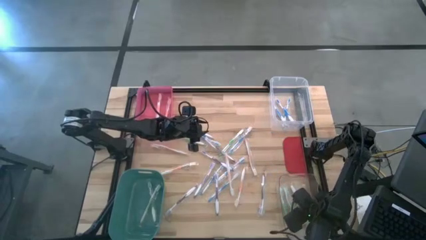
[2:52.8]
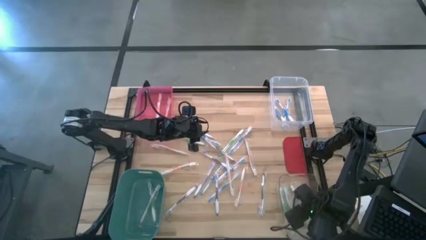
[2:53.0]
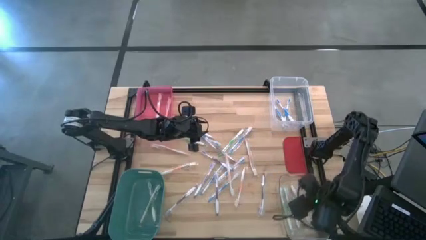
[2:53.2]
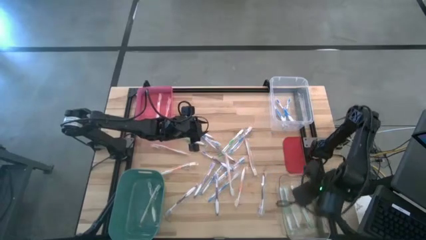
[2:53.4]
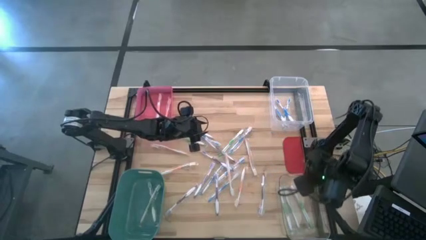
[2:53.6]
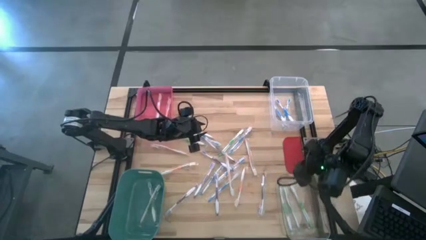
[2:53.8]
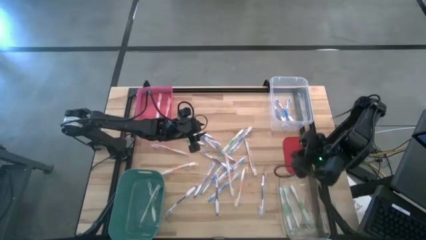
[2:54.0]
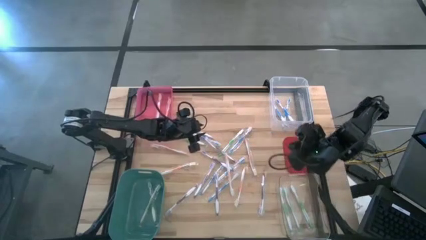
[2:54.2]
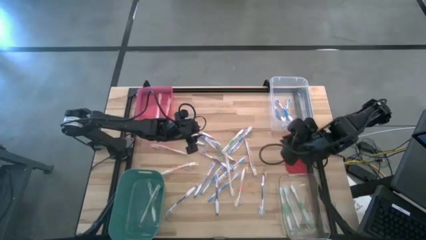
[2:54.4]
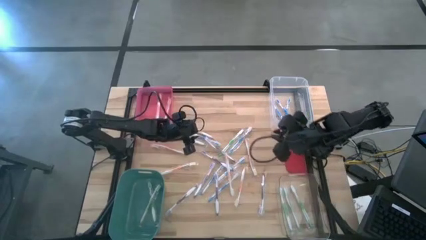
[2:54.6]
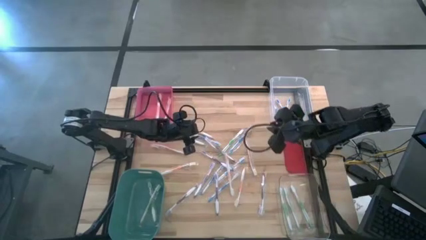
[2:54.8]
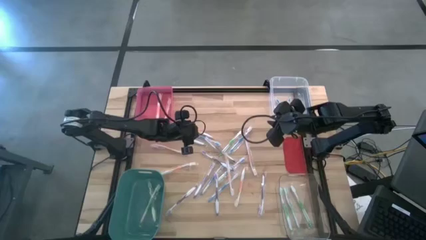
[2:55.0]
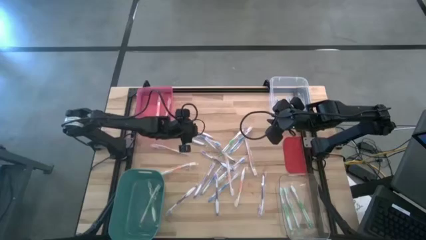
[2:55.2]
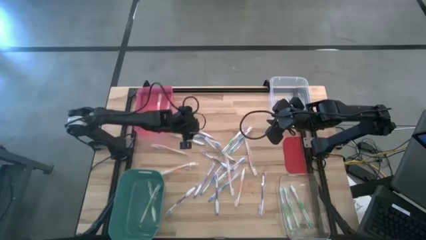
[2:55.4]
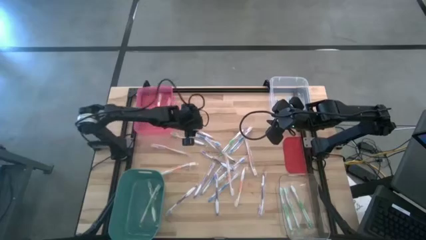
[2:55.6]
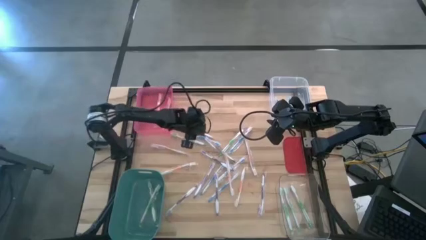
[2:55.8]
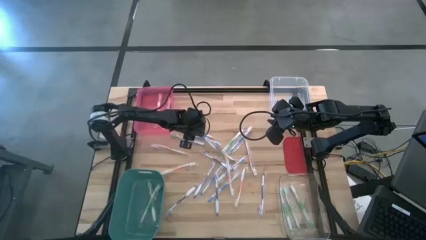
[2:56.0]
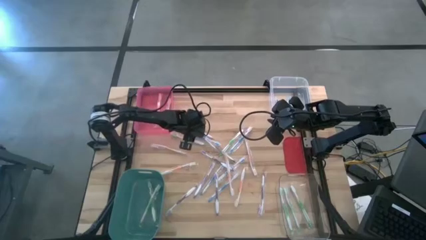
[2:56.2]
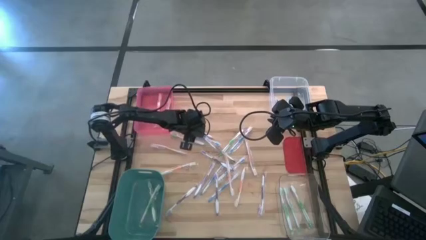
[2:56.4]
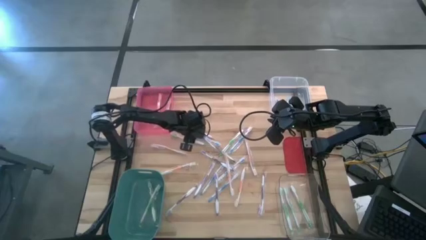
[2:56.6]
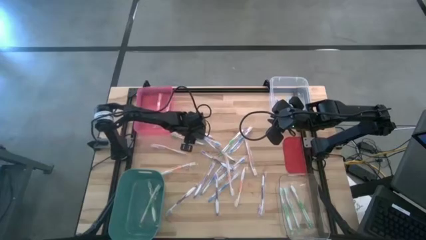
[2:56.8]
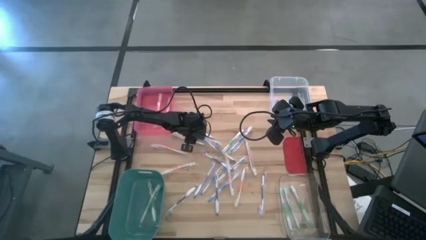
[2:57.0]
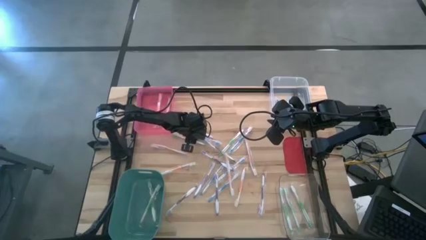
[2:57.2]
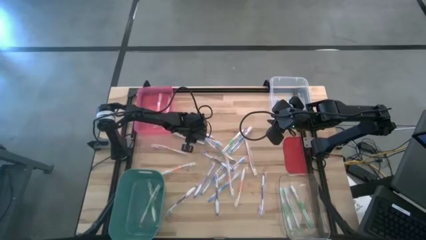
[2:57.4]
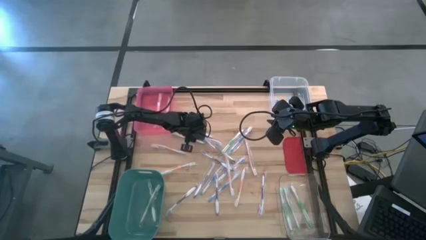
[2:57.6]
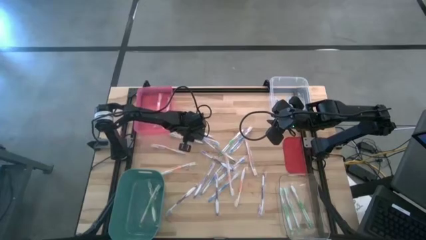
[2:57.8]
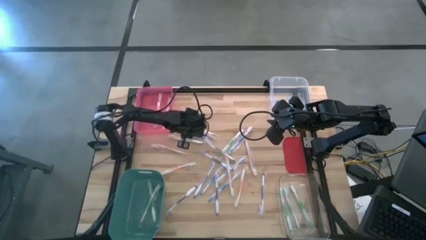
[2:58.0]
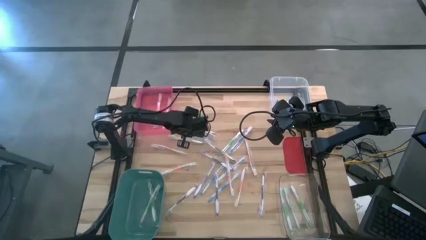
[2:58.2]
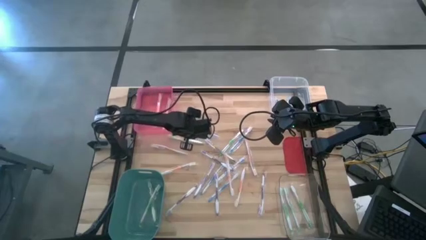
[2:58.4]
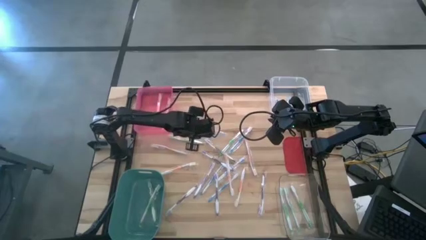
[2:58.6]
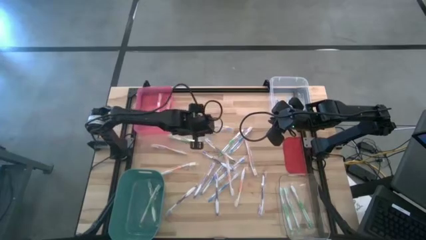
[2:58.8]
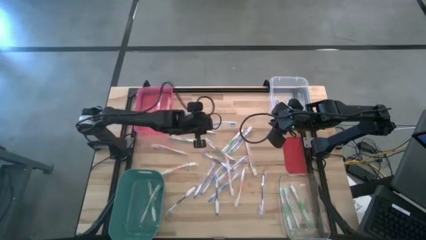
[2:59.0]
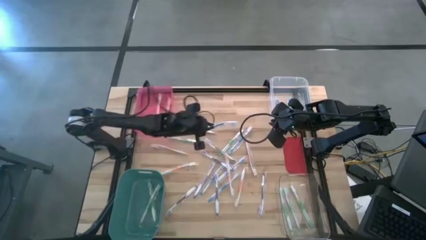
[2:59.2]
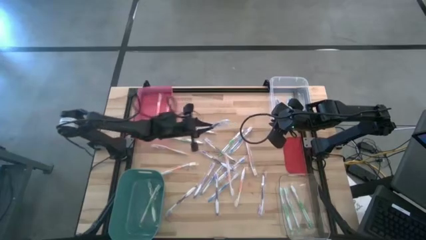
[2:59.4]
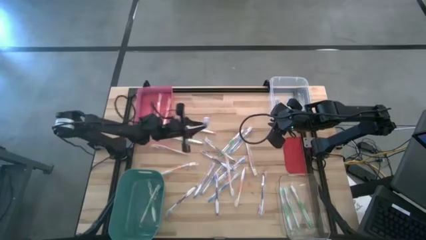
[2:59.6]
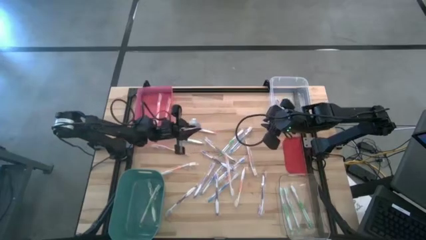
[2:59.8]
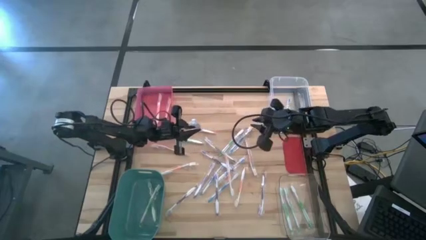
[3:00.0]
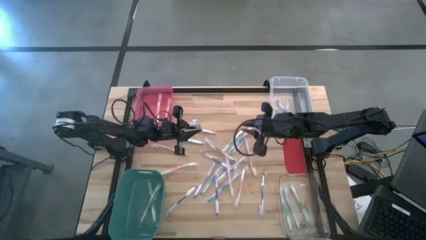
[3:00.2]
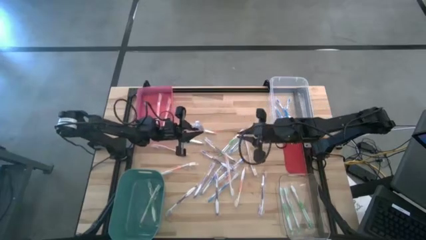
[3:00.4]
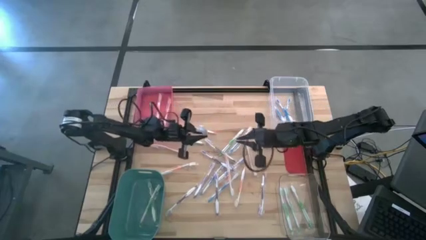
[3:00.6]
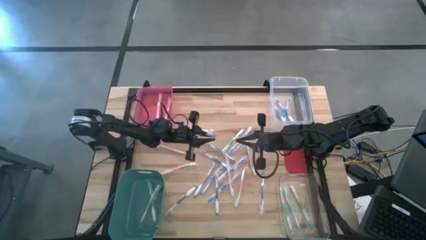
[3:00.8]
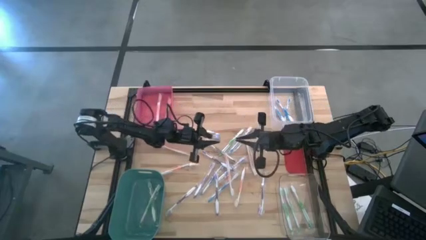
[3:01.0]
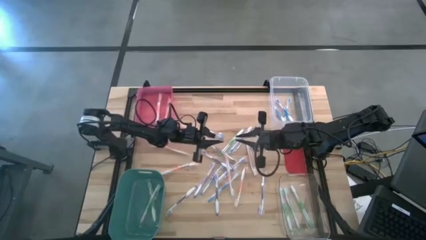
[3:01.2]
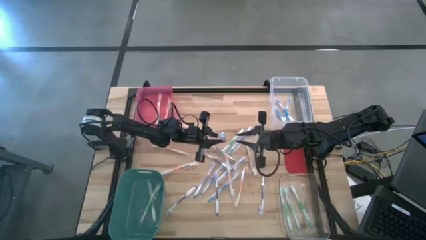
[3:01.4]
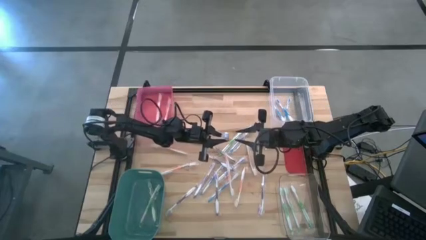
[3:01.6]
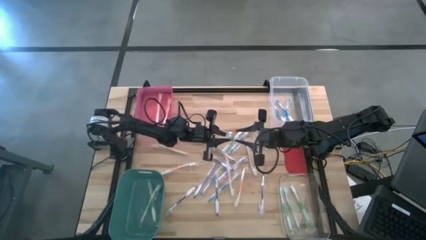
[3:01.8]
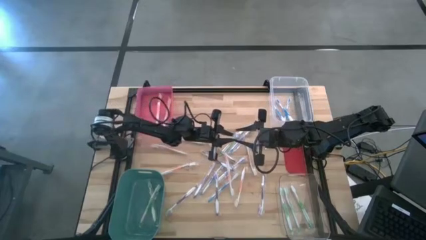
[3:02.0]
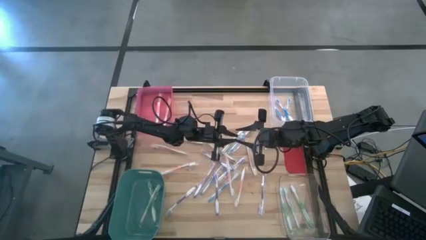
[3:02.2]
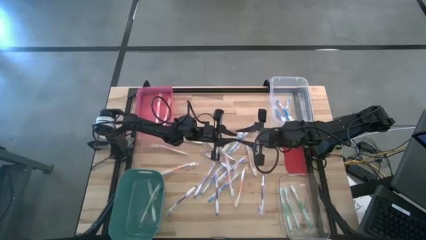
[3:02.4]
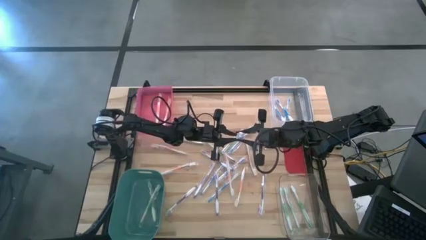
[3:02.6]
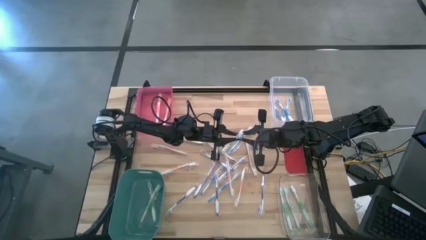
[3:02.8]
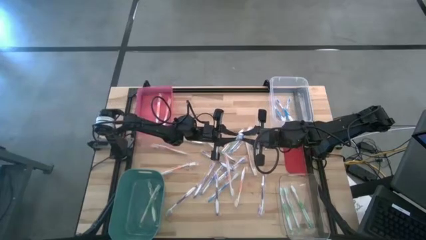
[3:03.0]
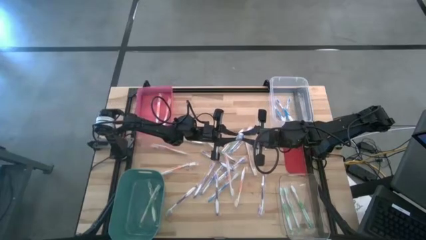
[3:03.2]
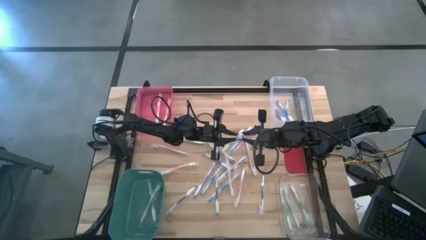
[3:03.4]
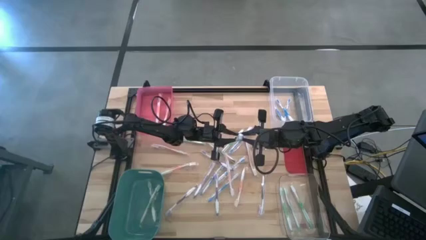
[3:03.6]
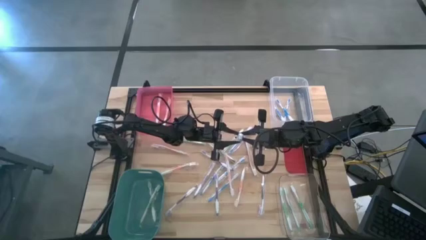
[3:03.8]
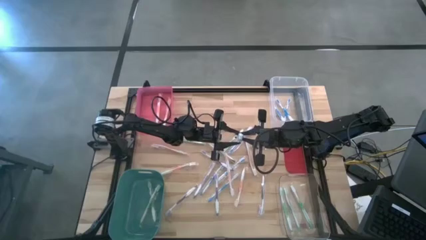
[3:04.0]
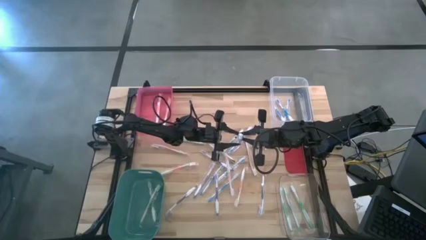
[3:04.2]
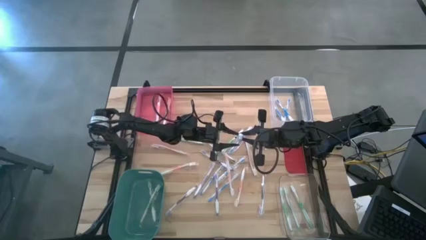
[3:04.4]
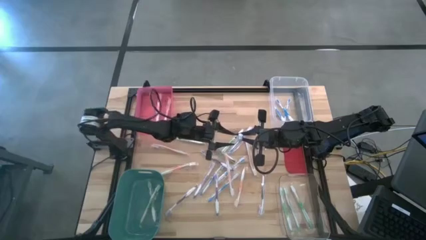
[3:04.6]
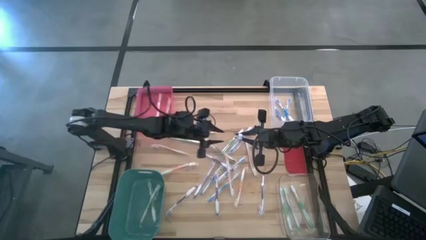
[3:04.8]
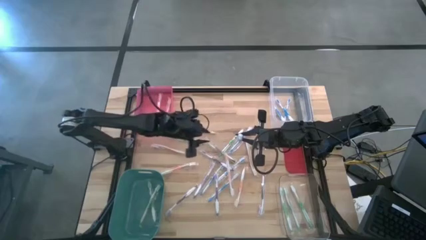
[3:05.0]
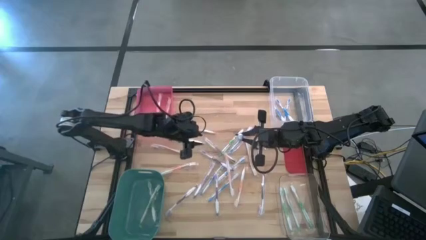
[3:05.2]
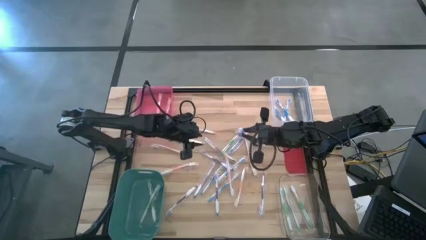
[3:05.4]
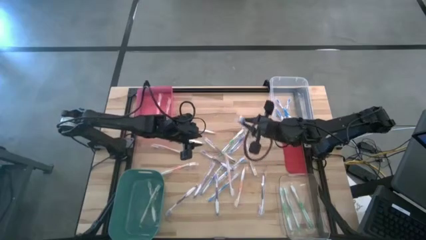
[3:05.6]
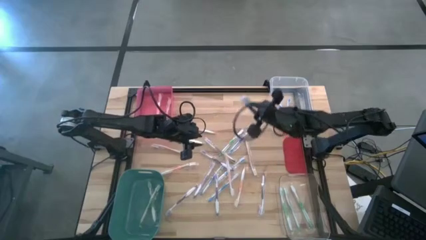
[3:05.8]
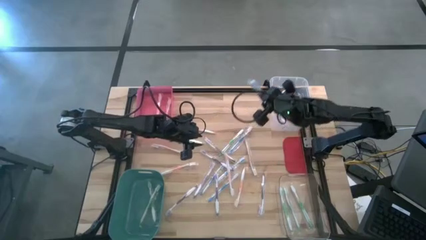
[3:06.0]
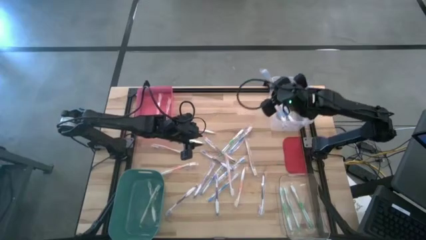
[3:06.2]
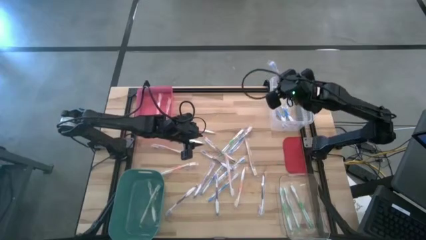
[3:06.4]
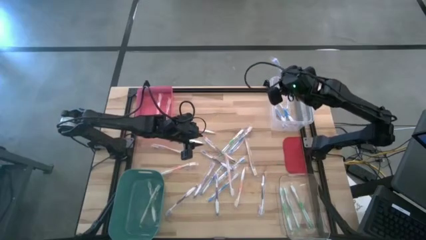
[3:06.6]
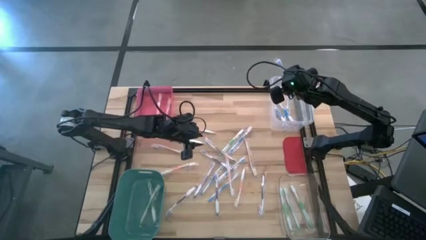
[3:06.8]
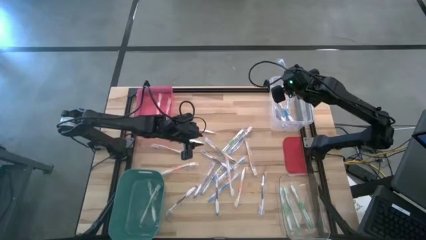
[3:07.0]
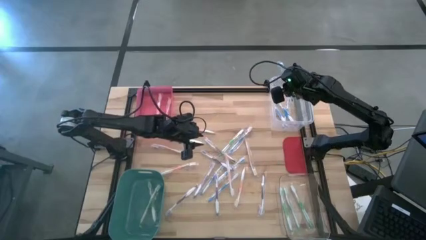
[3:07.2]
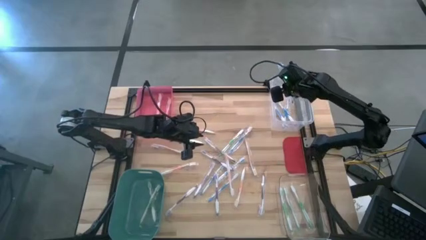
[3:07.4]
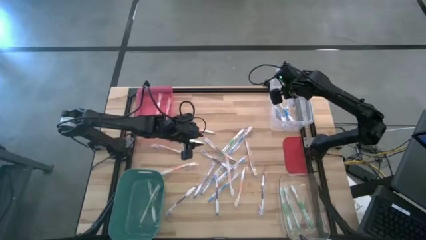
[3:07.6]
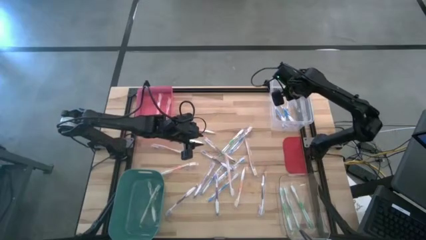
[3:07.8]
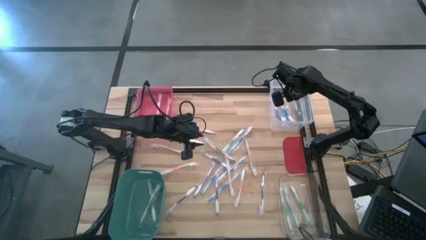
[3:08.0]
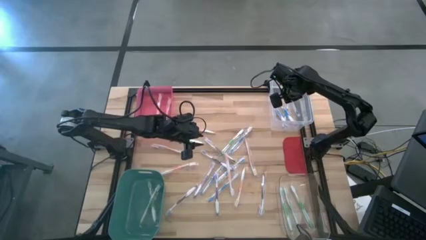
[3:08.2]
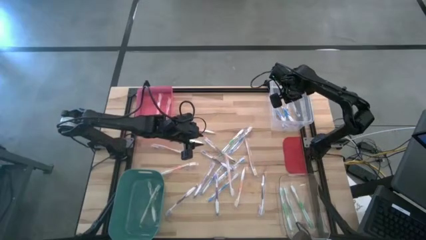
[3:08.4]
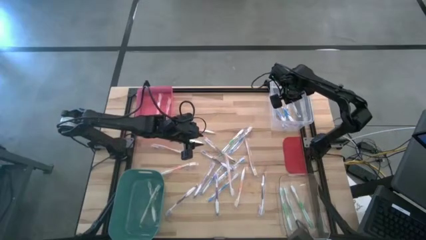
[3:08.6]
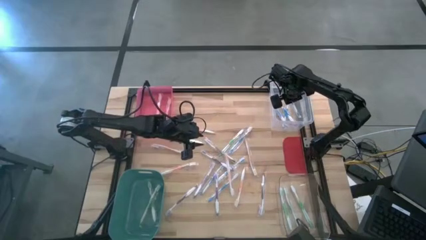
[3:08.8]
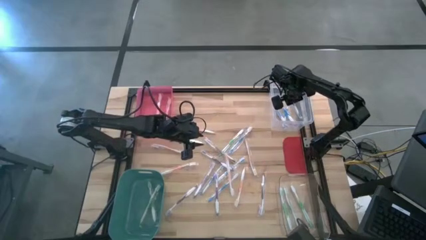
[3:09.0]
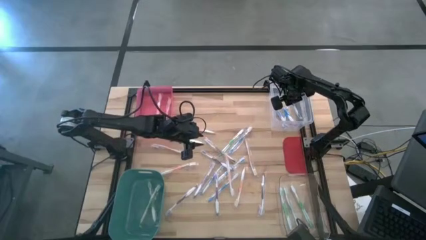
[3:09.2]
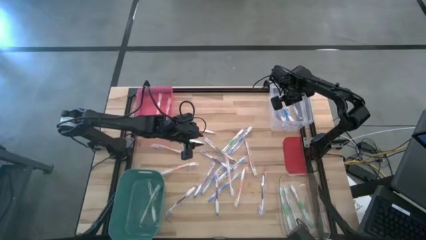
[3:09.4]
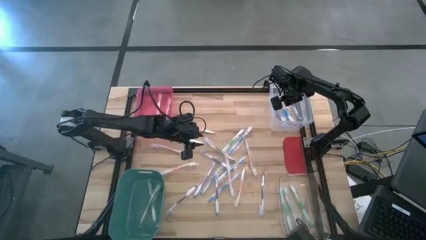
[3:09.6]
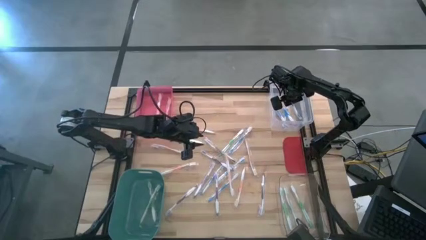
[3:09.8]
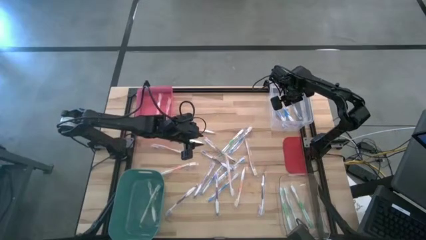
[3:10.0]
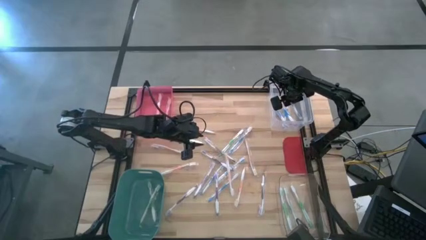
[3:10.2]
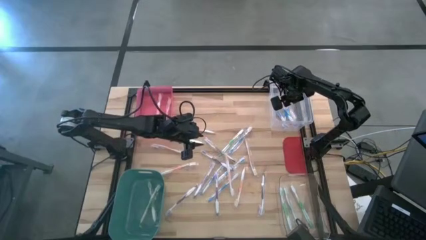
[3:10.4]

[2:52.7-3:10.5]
Task: Pick & Place Toothbrushes
Put the blue toothbrush into the top transparent bin
